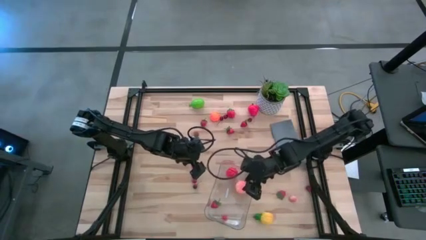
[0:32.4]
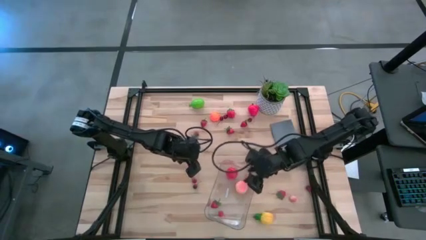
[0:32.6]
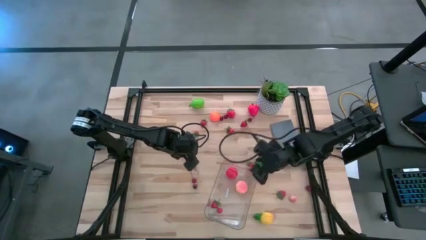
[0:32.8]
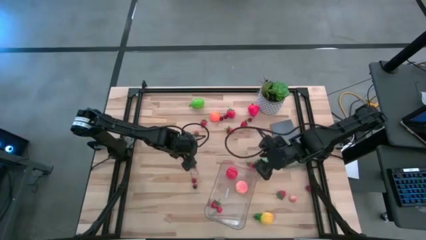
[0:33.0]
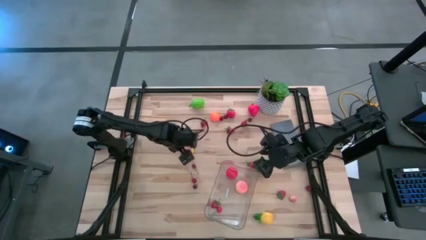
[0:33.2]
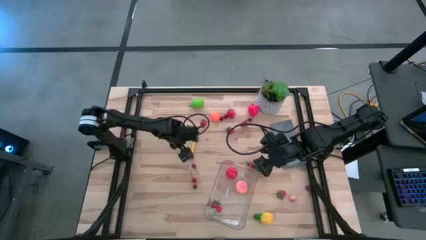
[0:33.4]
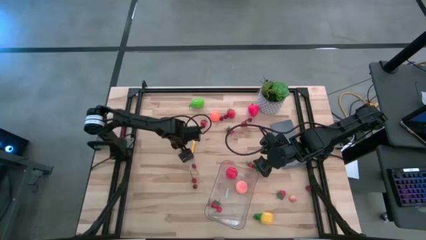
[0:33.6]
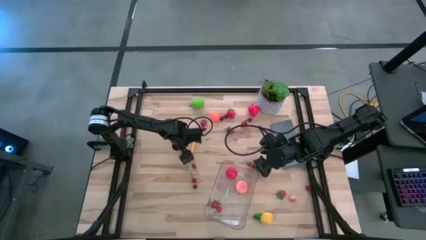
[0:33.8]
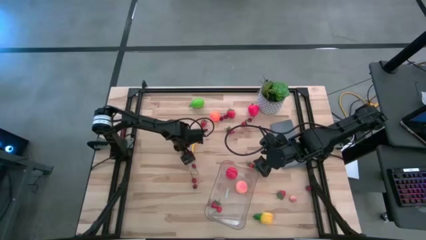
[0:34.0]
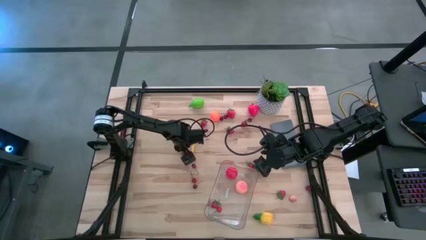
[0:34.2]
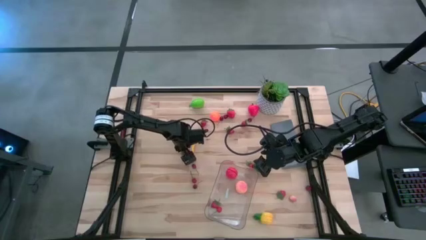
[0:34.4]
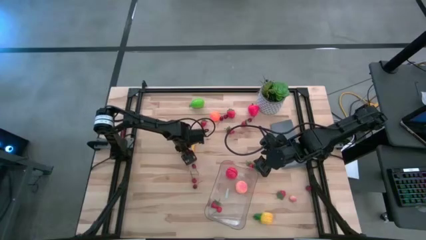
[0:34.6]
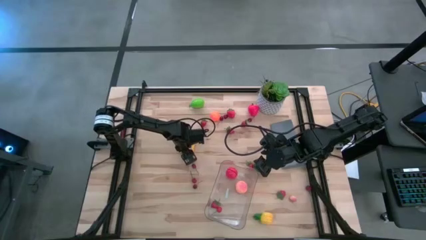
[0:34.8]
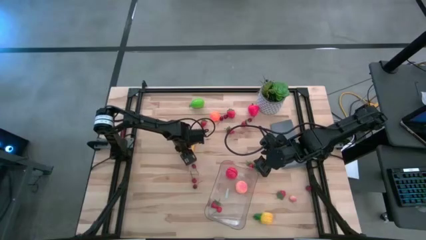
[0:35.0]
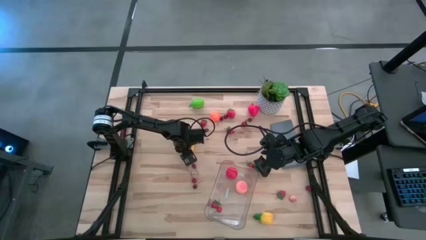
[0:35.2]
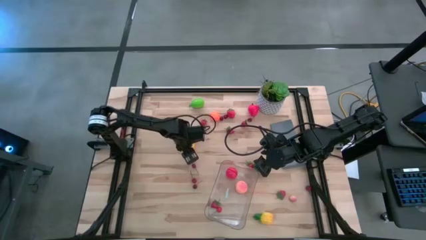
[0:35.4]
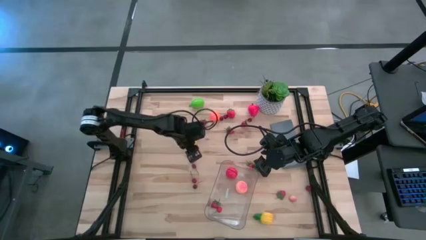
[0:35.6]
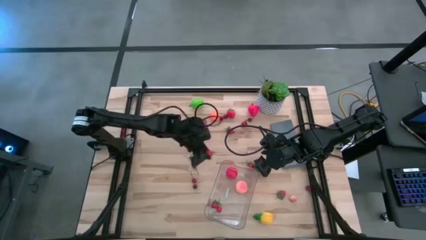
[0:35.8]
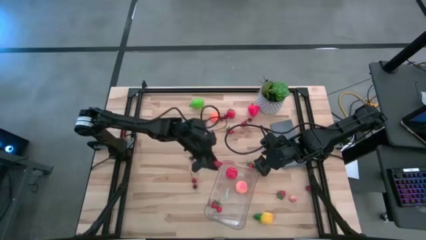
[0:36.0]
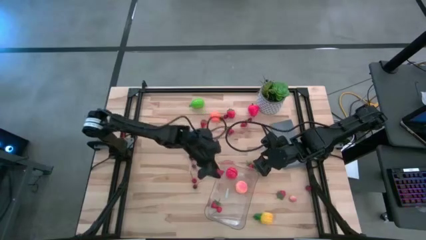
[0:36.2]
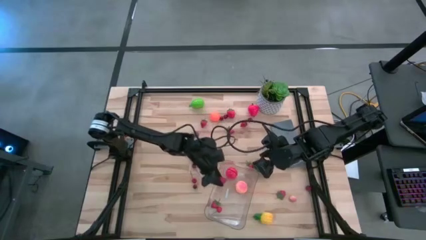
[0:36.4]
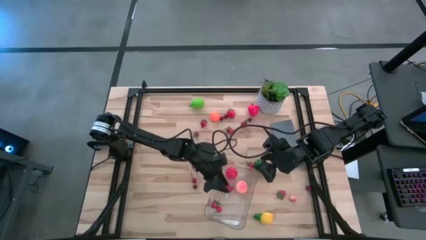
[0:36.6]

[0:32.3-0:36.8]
Task: Pick and placing Produce into tupperware
Put the red strawberry into the transparent basket

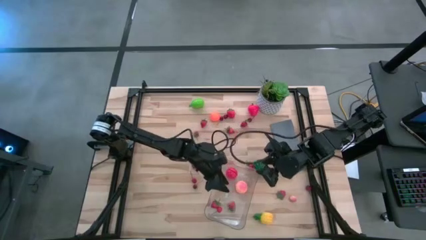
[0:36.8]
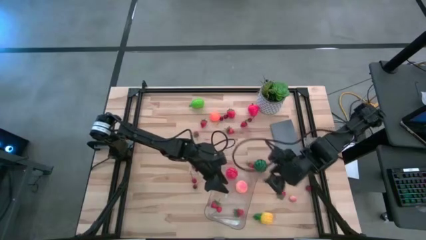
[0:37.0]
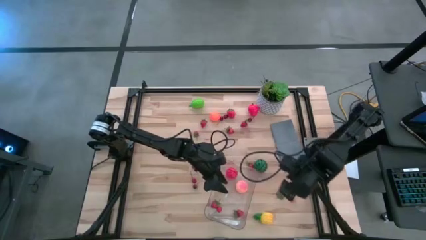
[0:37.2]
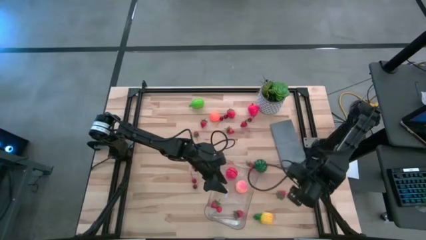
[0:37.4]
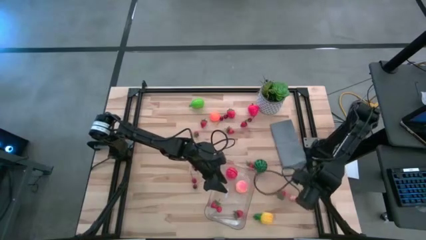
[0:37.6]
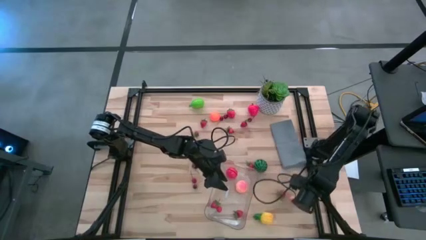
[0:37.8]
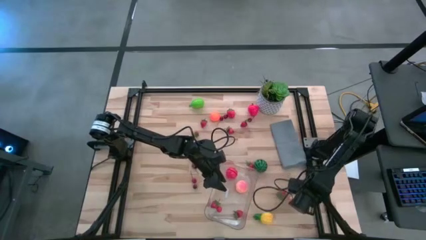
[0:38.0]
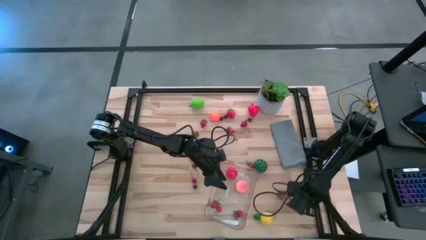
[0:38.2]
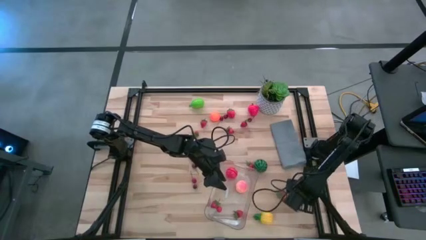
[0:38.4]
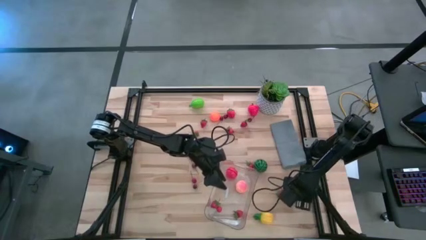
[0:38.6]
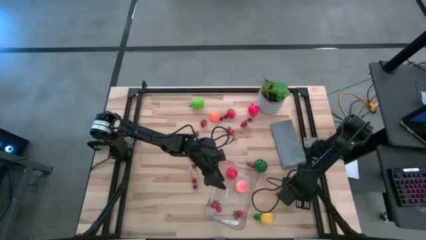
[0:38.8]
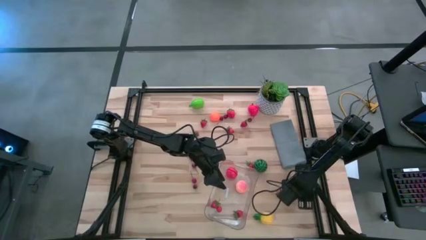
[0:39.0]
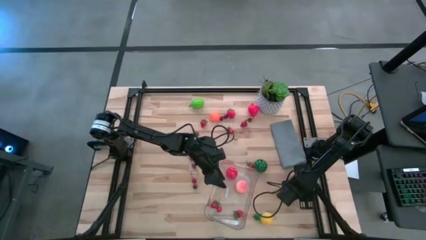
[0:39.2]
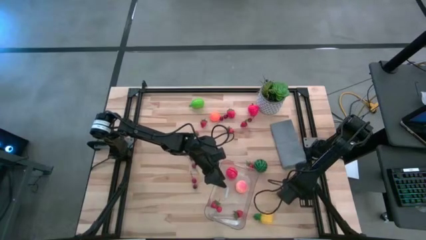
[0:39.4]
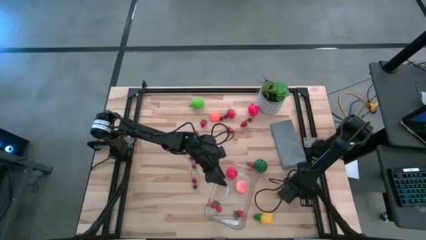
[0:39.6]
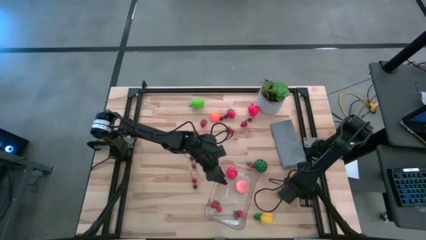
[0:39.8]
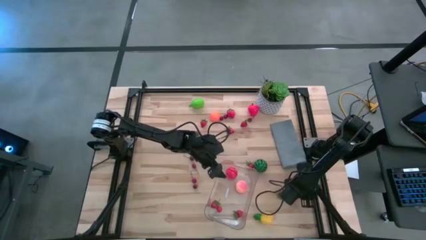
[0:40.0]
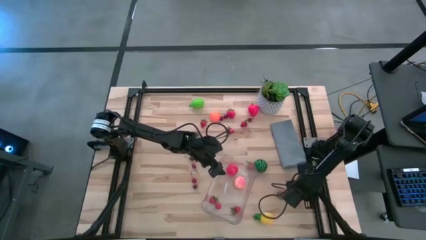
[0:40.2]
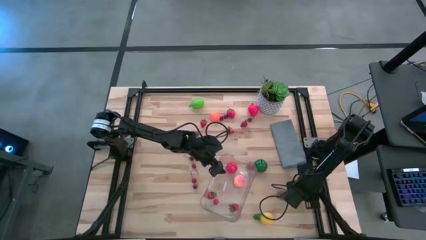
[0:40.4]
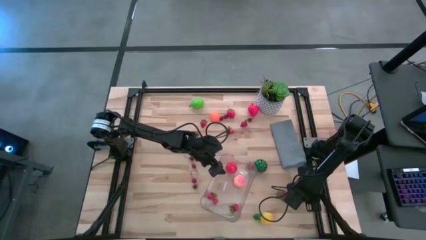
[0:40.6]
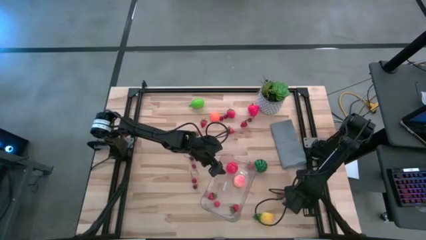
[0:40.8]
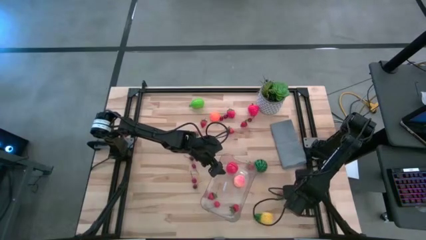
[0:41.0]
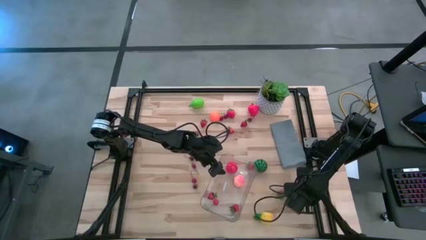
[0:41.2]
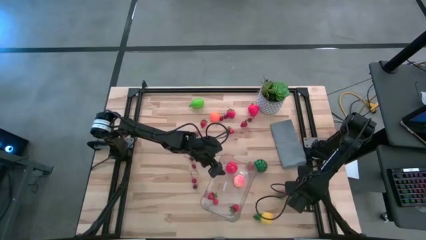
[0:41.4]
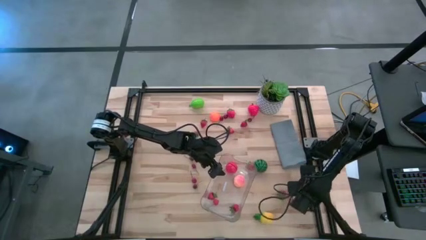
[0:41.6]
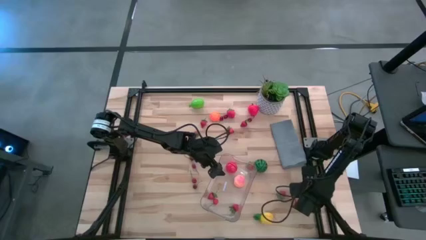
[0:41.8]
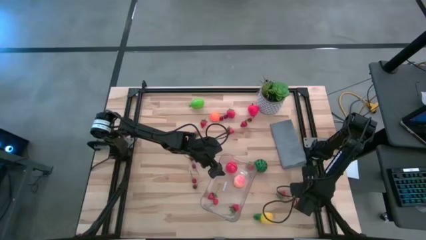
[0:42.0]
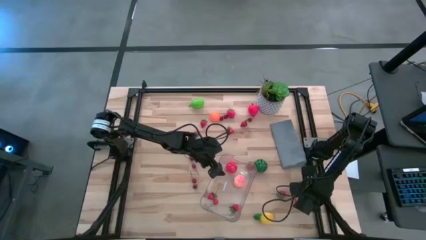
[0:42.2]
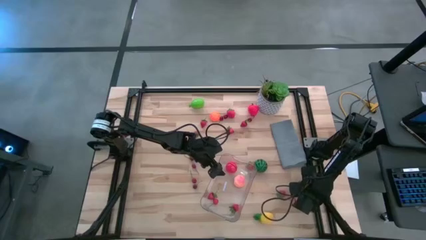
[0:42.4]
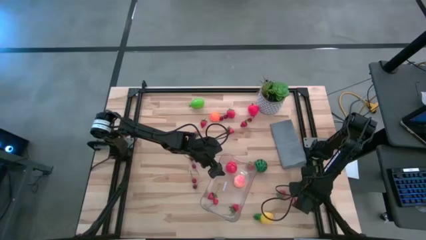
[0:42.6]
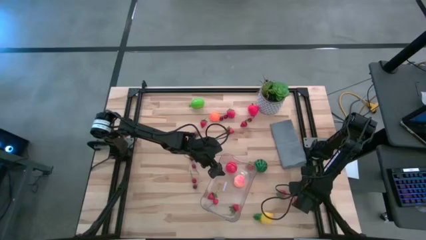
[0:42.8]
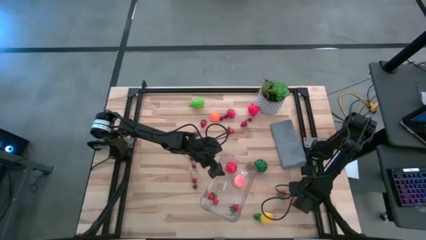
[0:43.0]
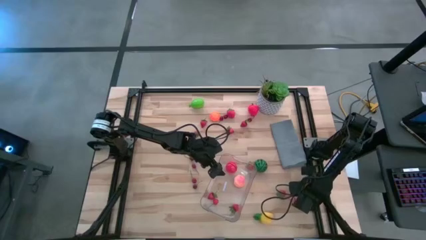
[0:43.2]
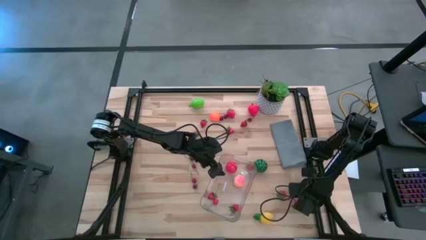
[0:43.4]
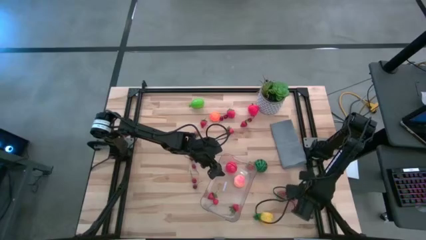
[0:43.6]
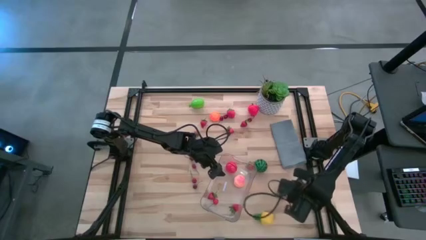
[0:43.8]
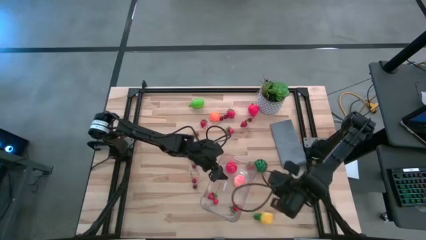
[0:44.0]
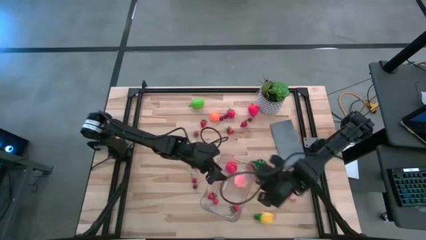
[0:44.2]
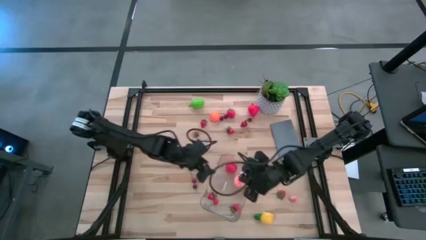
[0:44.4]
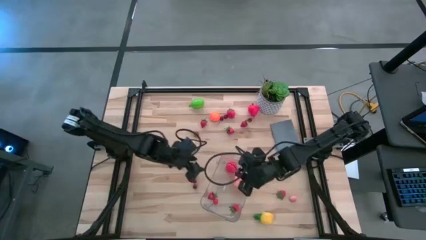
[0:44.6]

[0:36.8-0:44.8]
Put the red cherry into the transparent basket

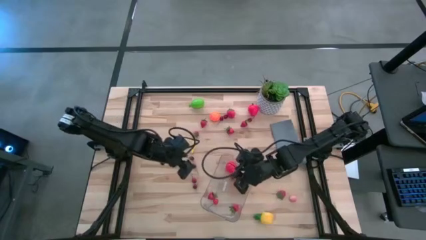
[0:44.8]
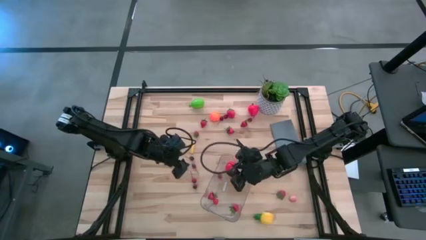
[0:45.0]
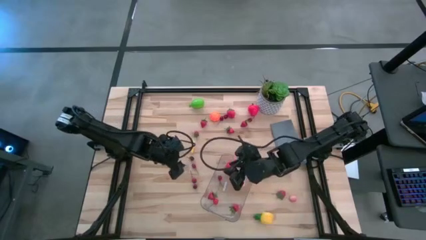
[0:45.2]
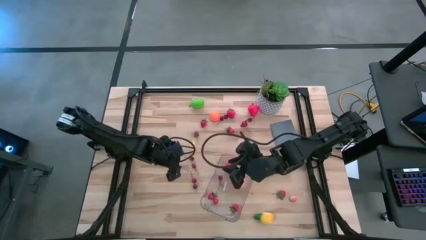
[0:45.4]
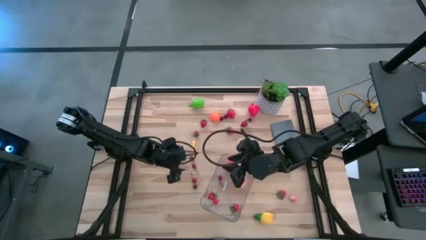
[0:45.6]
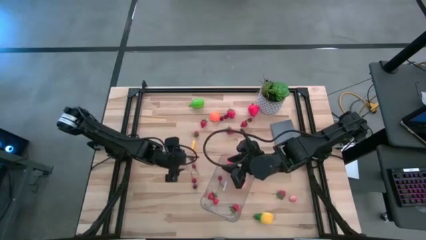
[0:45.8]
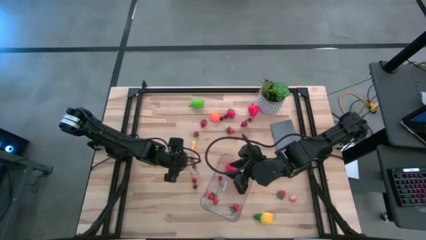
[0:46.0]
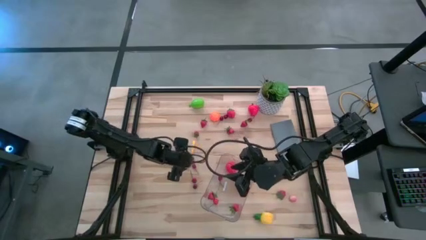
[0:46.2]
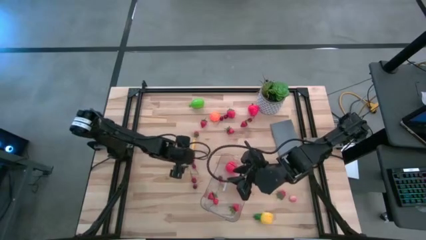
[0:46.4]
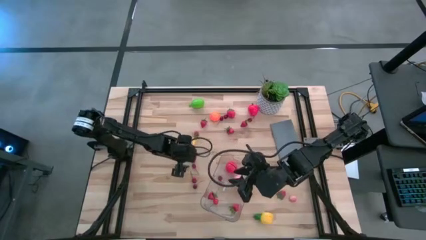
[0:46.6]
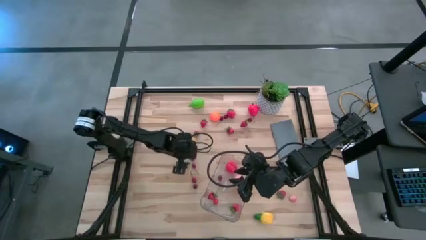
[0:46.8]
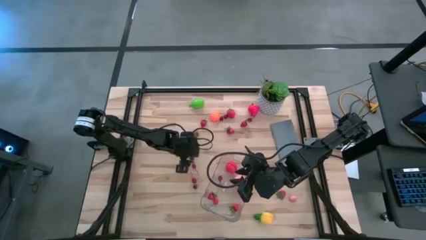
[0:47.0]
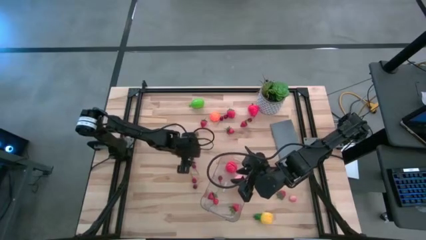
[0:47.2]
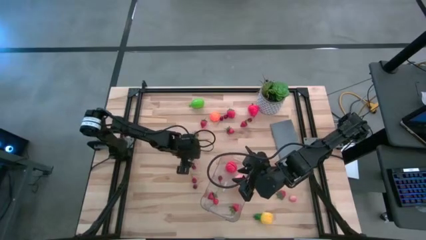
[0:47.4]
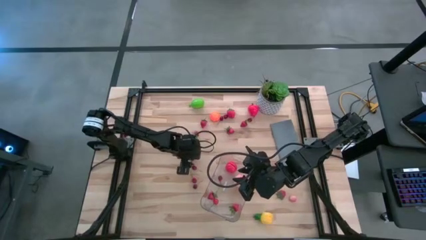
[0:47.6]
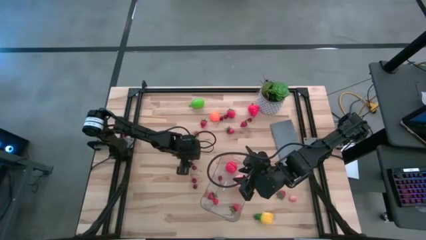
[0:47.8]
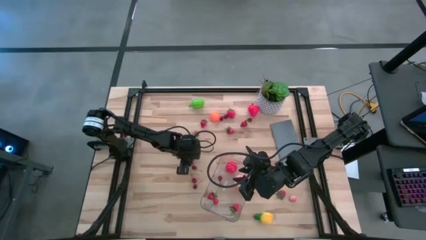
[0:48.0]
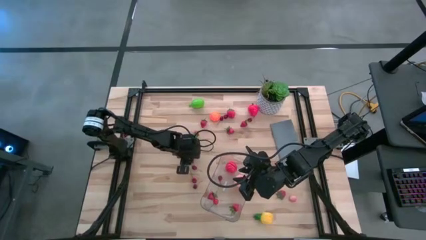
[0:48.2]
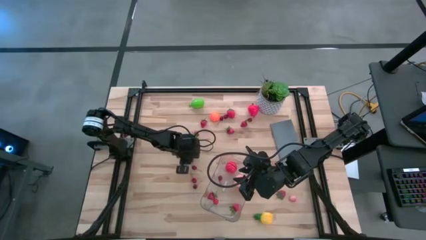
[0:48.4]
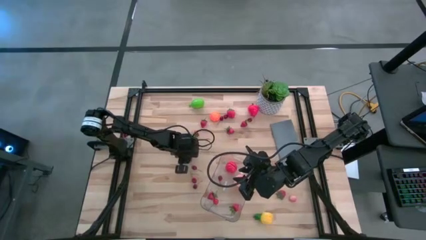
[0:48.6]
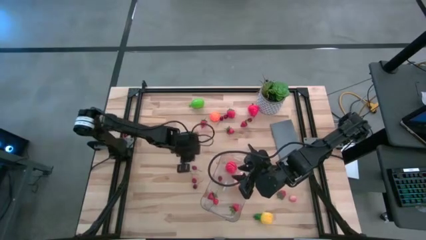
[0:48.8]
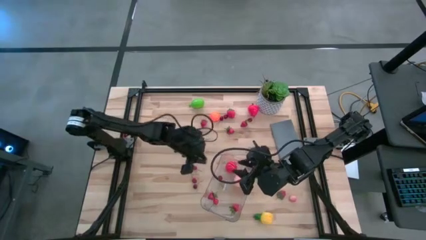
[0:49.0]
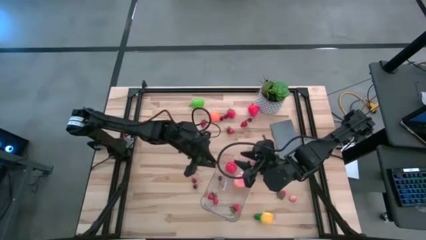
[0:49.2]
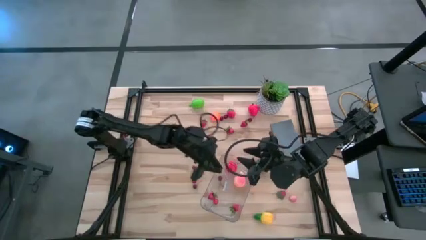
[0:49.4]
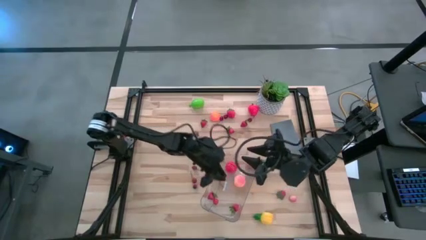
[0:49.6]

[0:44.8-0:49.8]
Put the red cherry into the transparent basket
